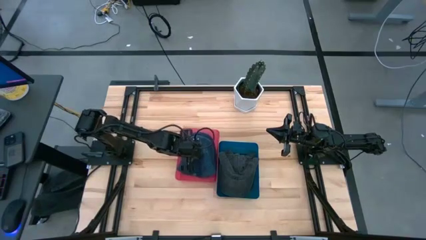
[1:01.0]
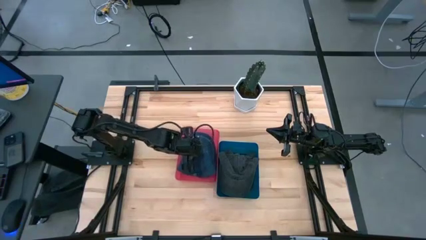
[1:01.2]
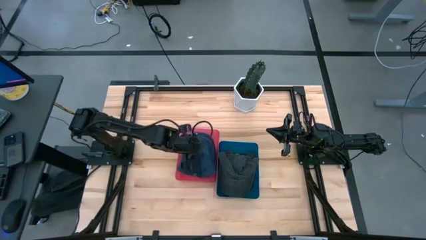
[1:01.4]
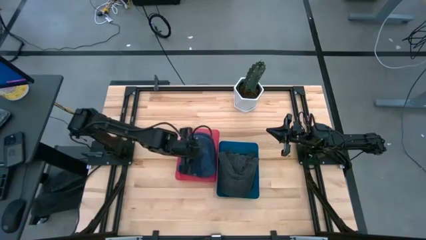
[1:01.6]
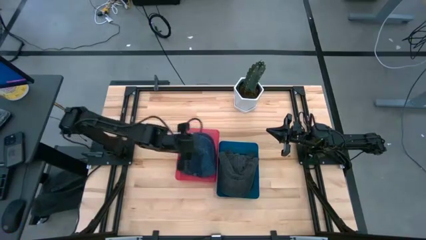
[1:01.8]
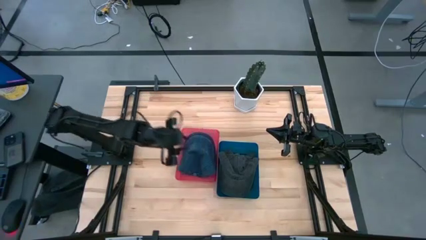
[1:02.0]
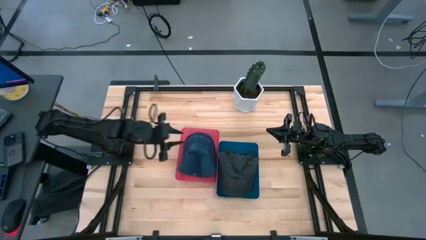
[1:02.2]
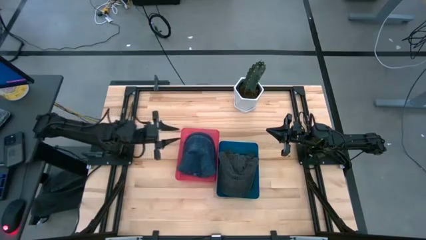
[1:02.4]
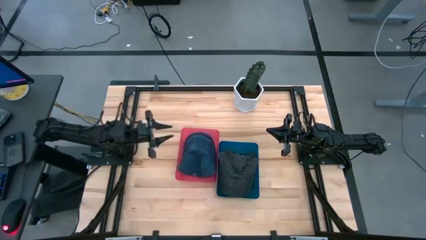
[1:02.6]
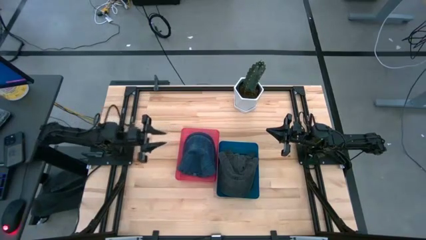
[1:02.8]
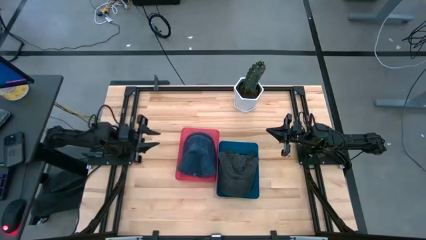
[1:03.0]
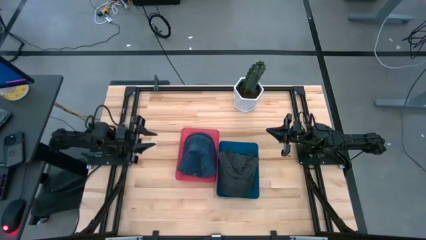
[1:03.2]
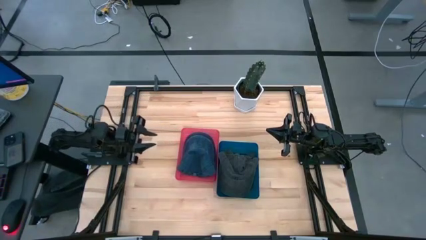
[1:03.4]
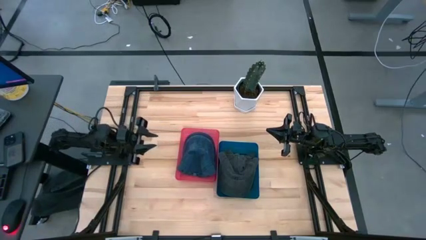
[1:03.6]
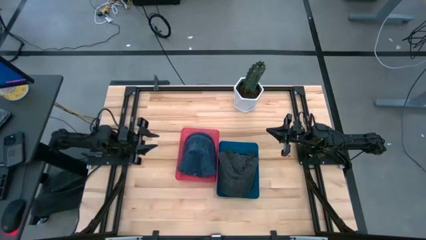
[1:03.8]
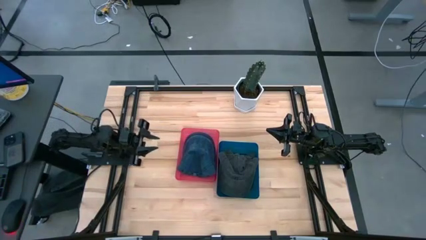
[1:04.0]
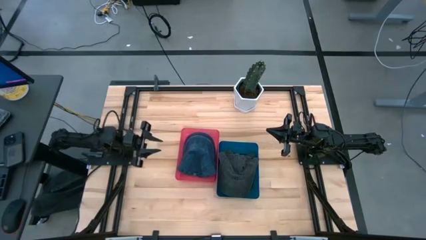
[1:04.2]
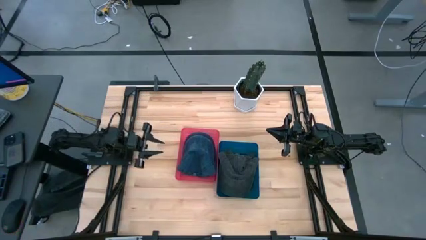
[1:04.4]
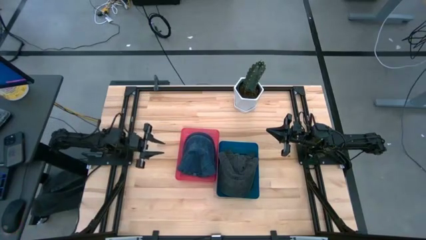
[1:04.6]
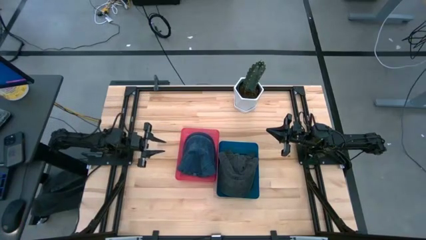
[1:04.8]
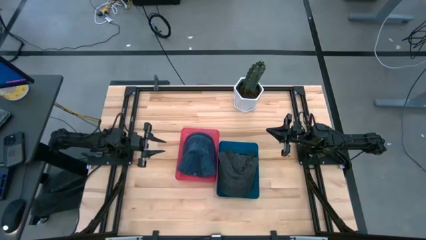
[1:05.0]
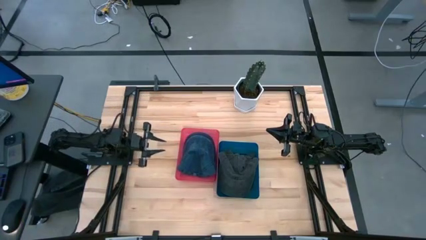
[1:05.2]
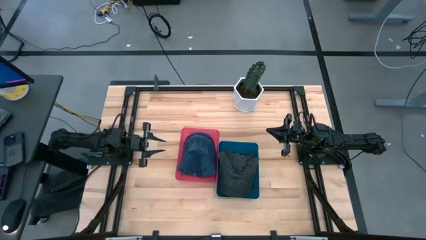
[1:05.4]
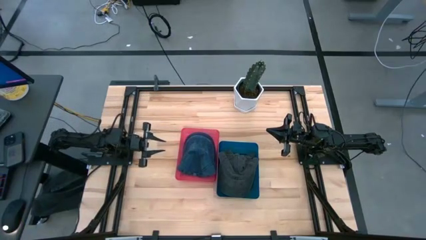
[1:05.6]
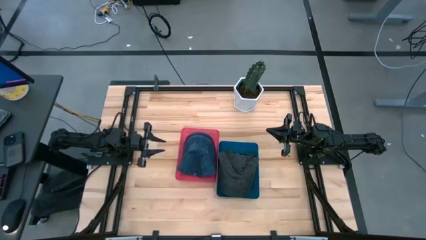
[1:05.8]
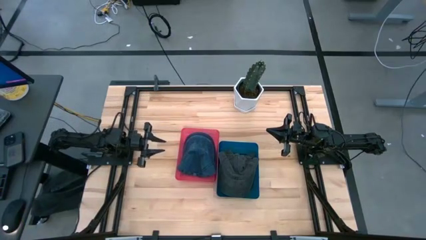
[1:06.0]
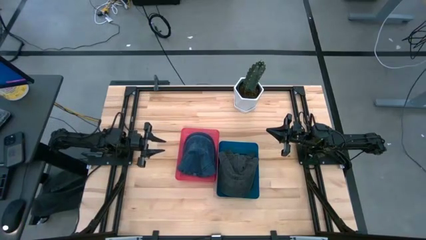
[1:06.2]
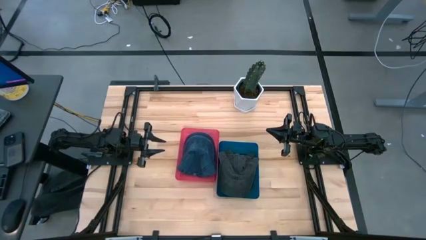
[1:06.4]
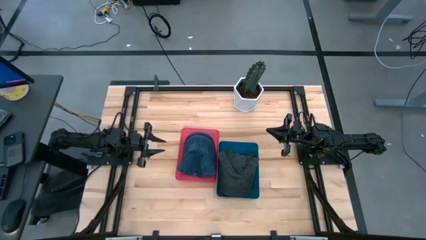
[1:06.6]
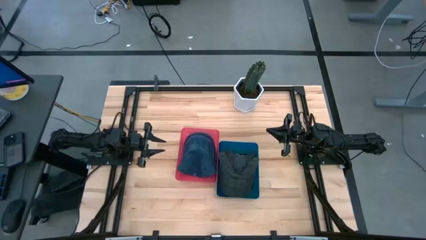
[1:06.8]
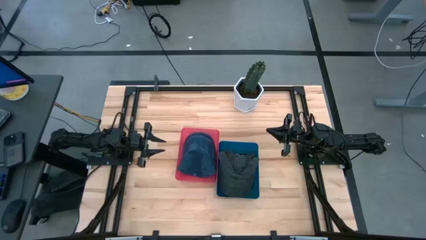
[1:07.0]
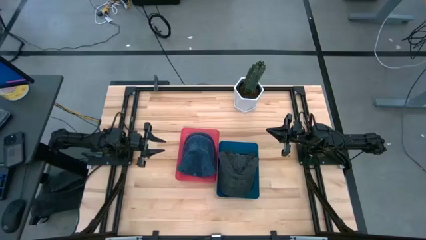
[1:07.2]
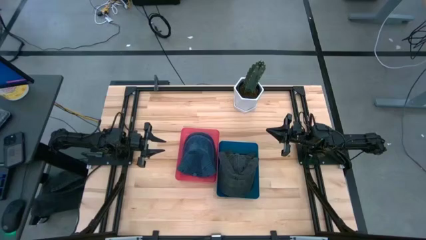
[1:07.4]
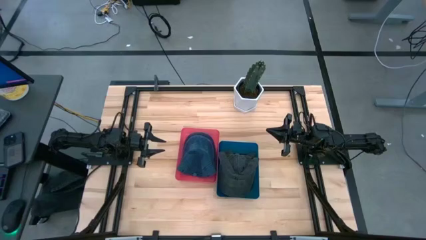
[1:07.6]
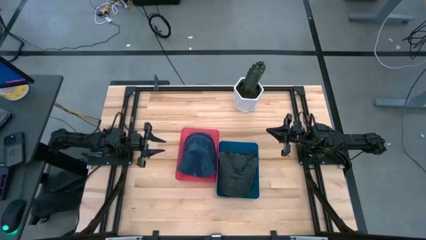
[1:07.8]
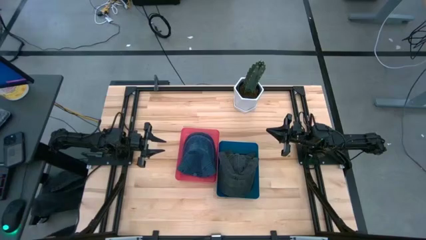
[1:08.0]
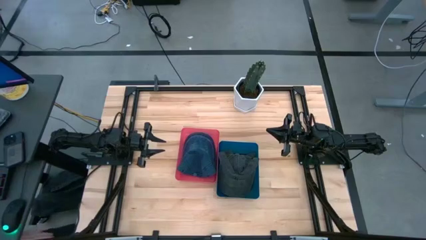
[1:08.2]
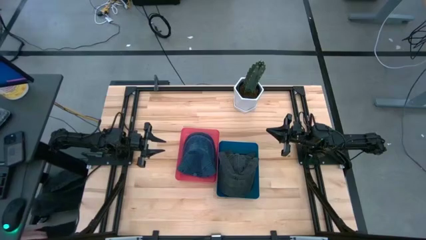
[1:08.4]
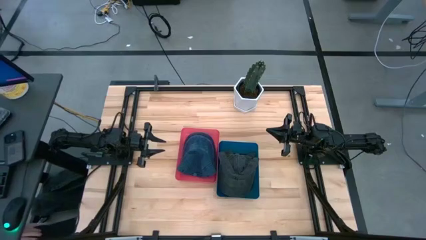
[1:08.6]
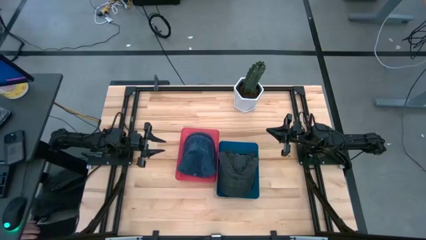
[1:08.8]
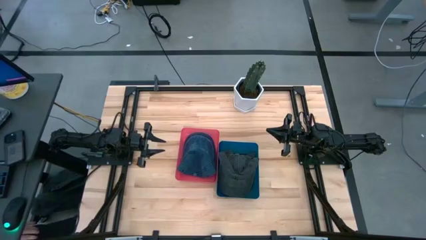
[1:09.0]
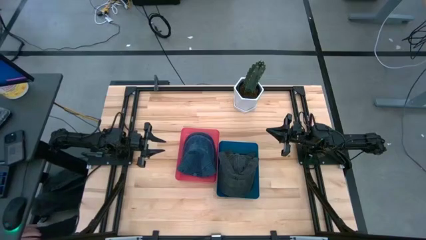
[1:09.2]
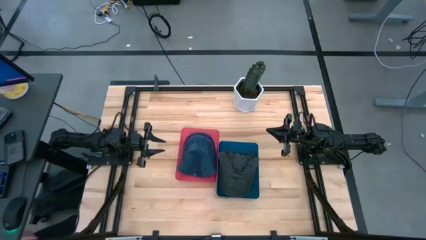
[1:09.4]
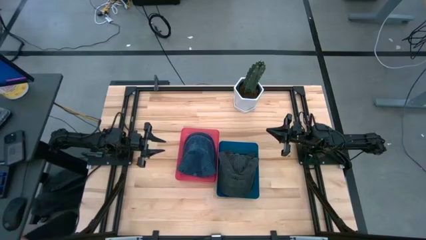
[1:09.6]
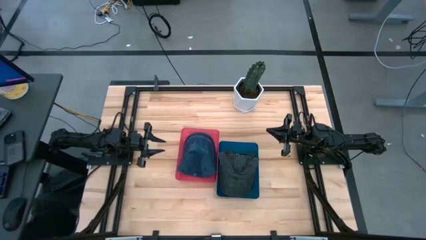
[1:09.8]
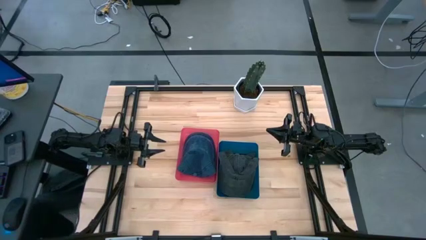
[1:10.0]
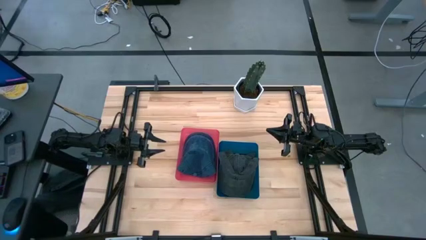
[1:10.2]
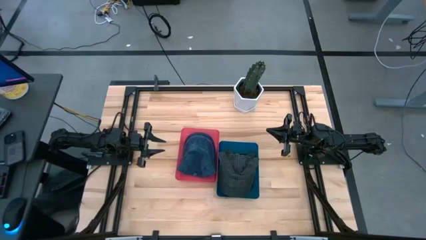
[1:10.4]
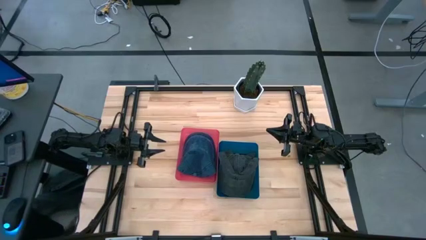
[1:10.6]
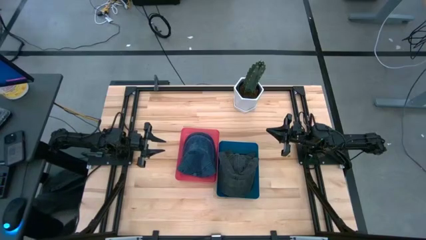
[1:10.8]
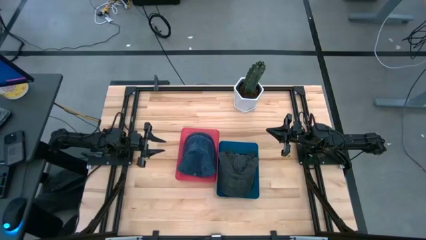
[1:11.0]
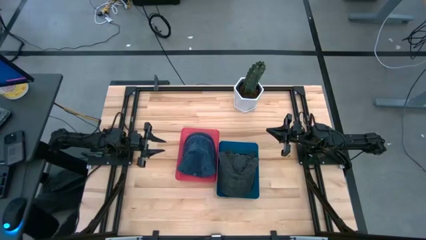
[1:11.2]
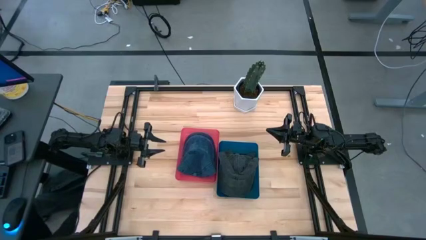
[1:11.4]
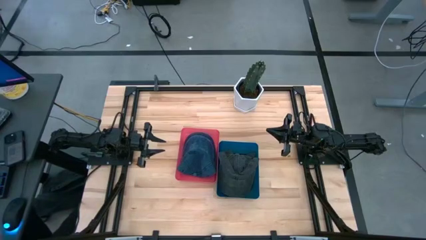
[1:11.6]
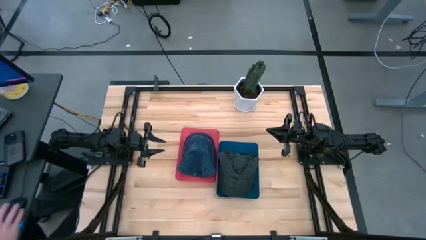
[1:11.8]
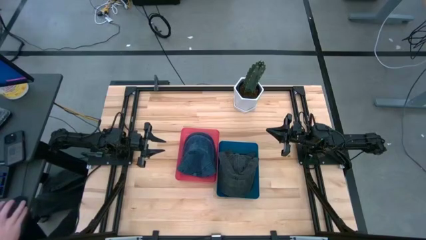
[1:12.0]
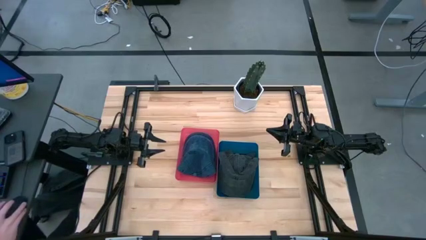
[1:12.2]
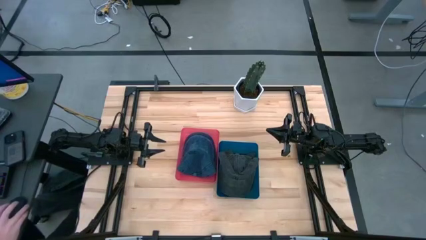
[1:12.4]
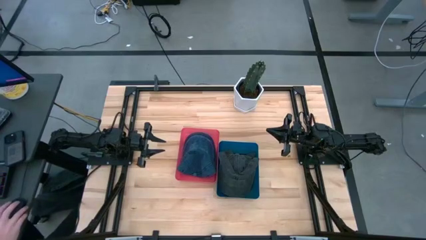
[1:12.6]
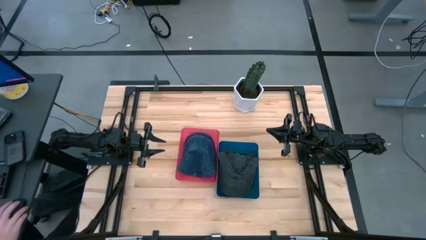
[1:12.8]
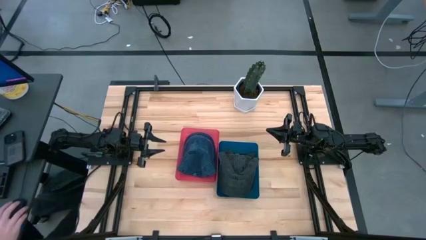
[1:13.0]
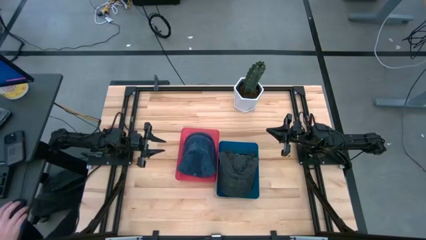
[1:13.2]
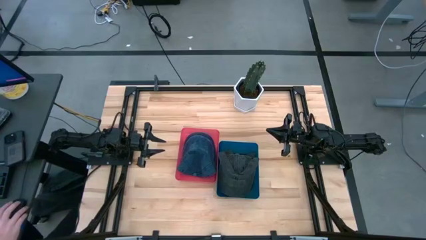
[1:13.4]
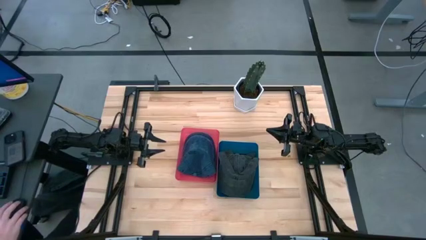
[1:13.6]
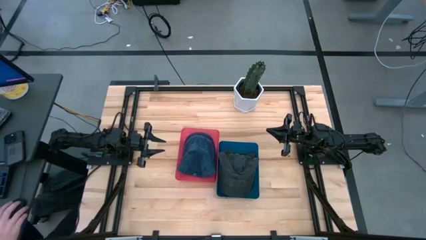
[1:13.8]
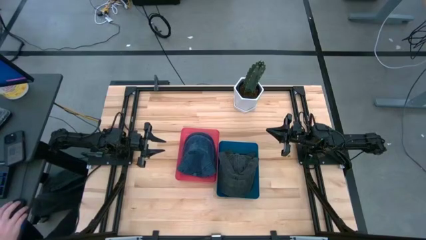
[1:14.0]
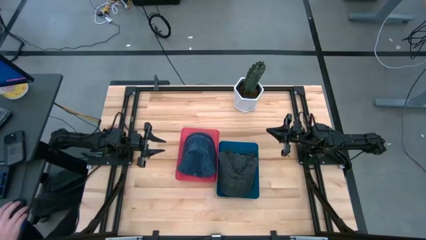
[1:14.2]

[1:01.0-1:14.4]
Task: Pick & Place hat
Return to Home Position
